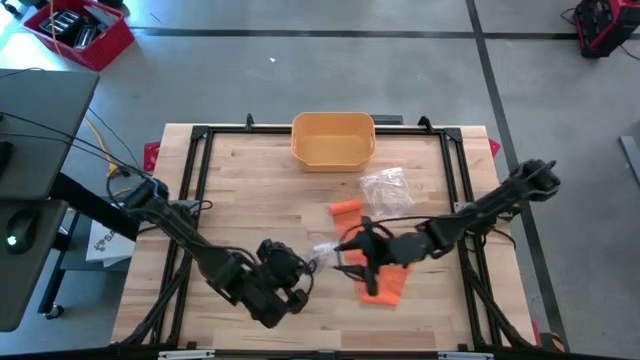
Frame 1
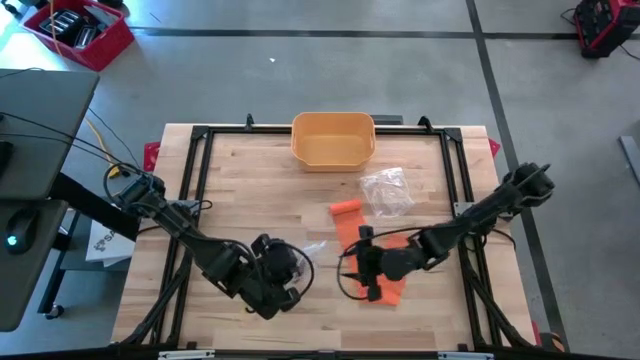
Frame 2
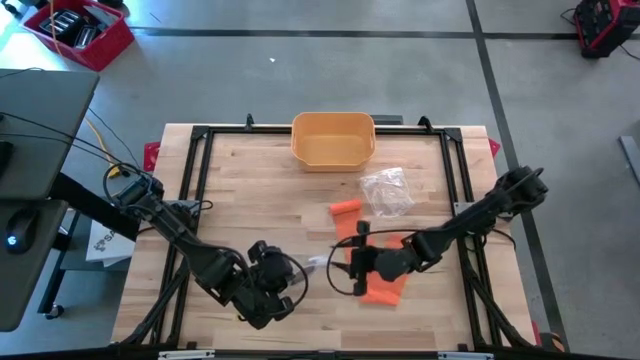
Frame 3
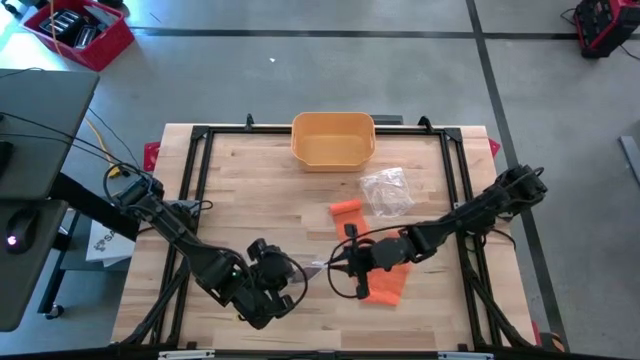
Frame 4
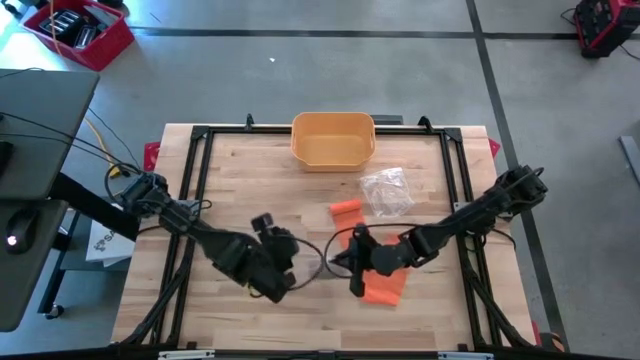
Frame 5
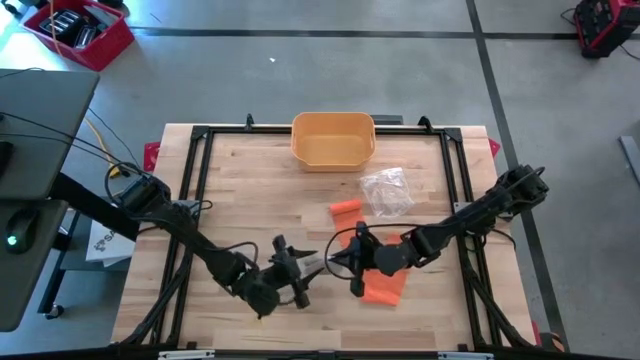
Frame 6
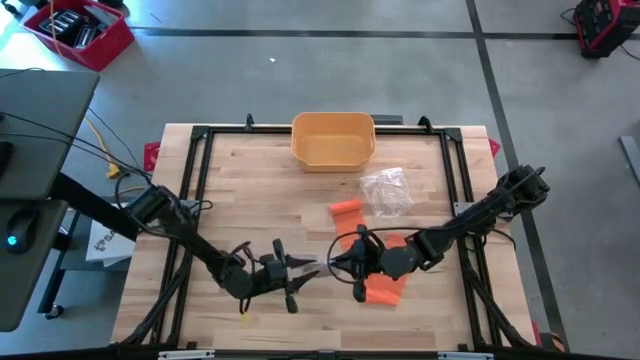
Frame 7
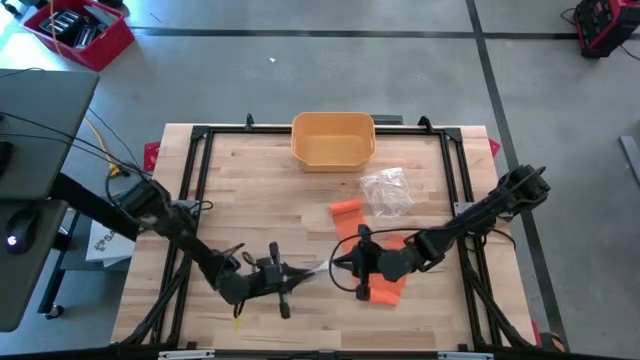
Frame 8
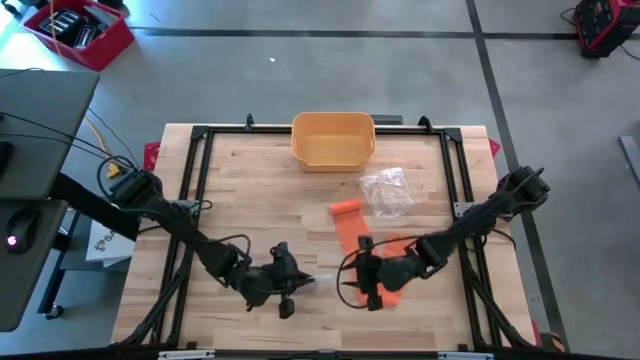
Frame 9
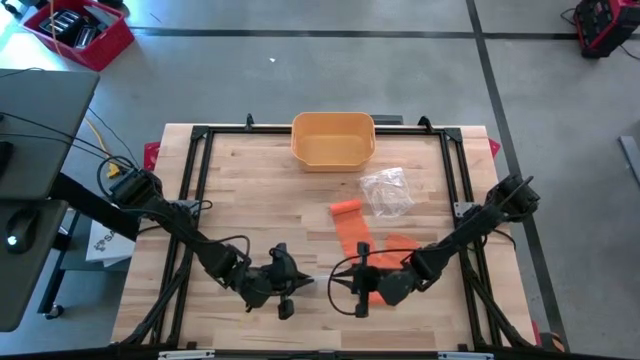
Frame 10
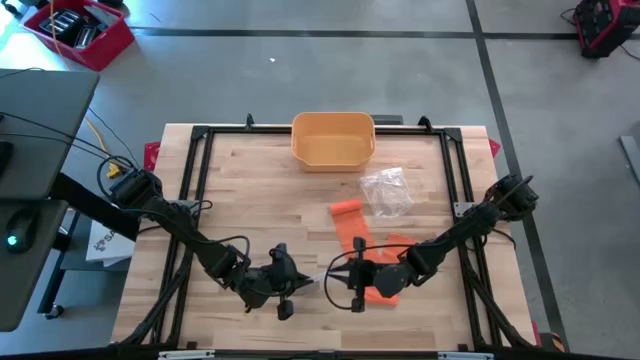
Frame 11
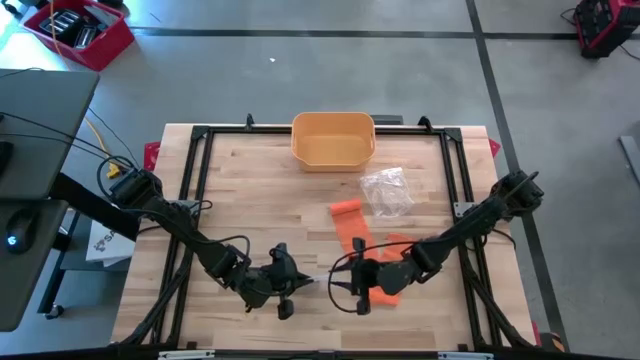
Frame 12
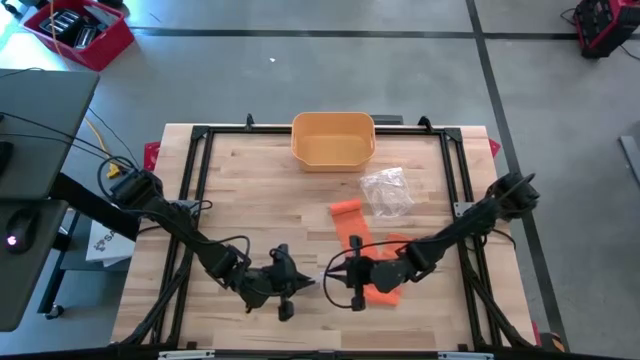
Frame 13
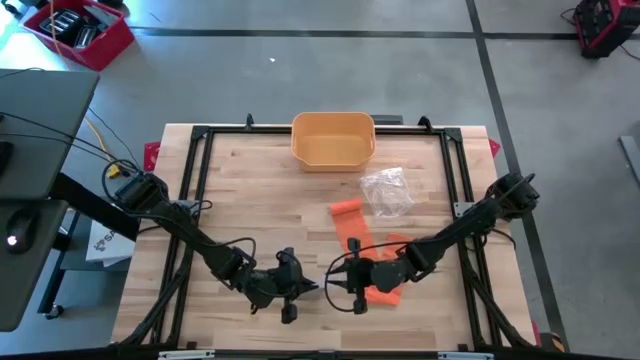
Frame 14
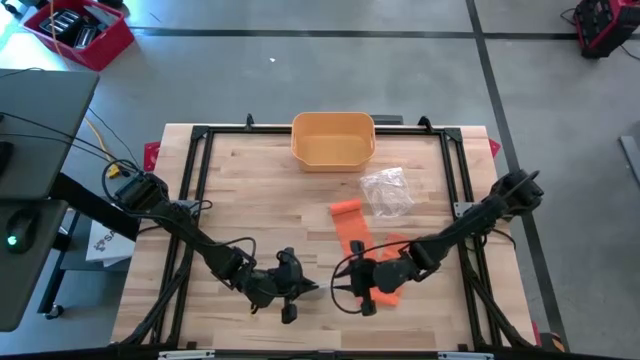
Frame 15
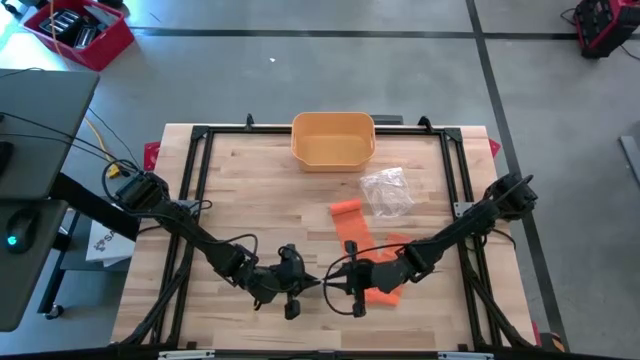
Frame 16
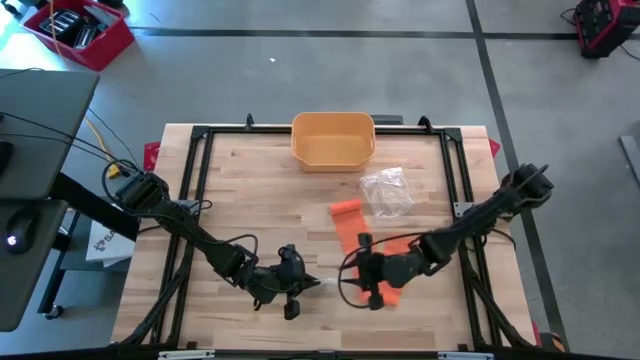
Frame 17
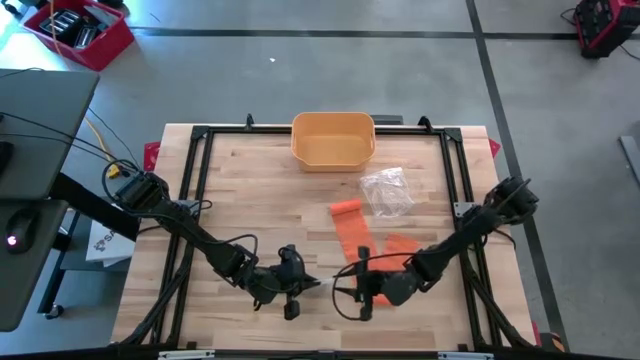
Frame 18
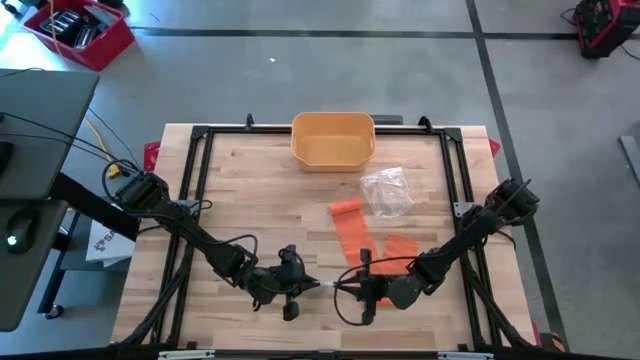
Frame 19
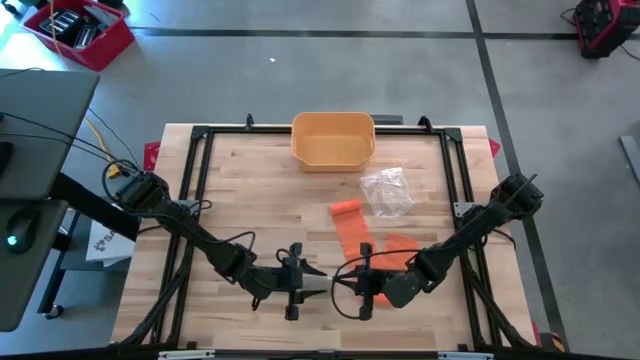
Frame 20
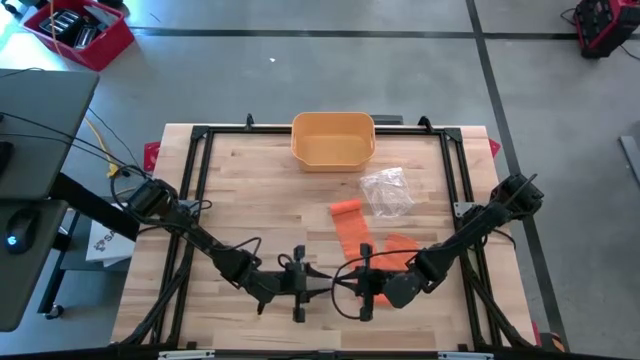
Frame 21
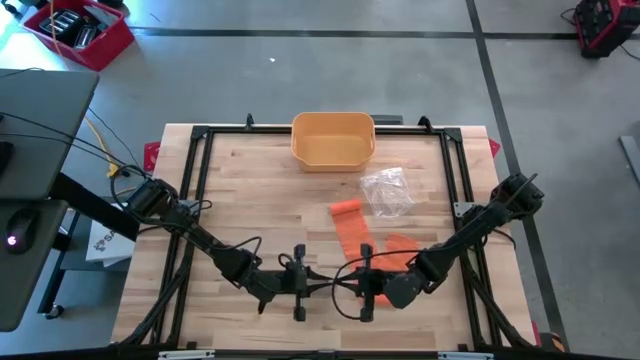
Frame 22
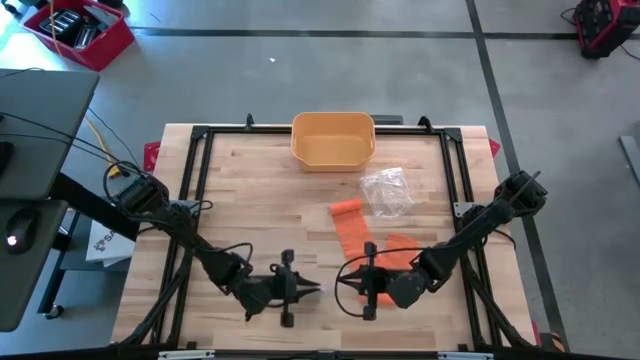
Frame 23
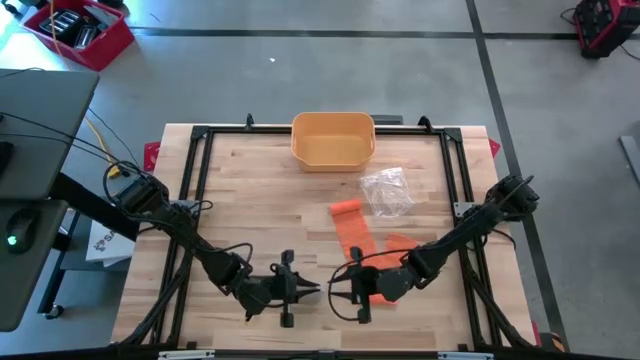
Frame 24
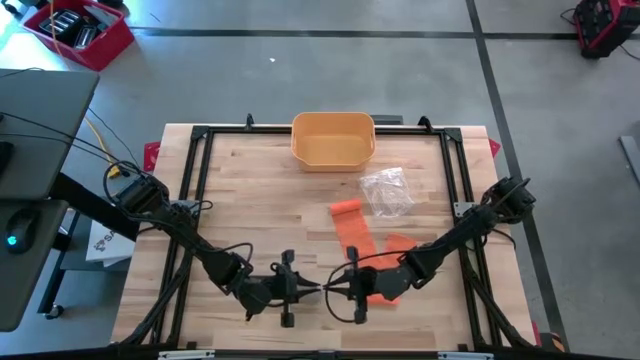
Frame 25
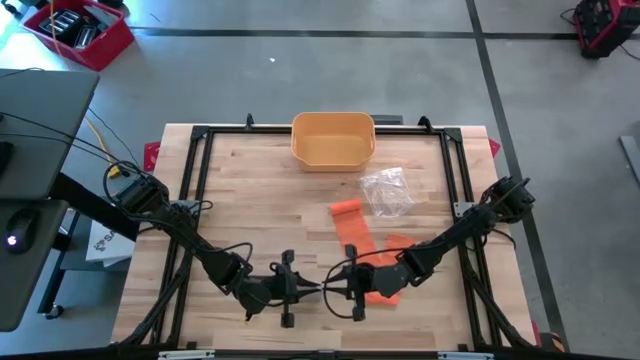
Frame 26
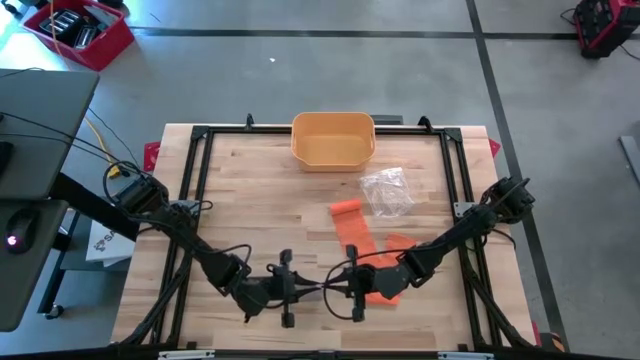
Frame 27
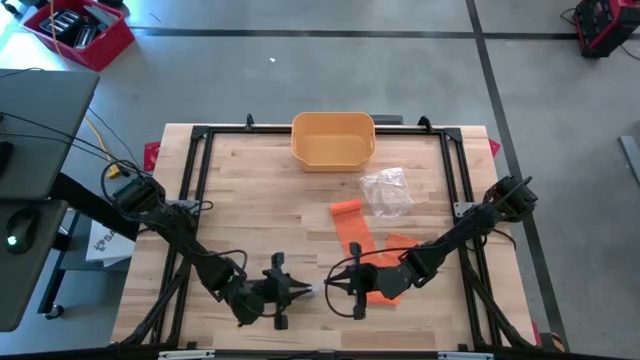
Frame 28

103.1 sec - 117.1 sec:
Task: Roll bandage
Close the bottom transparent zip

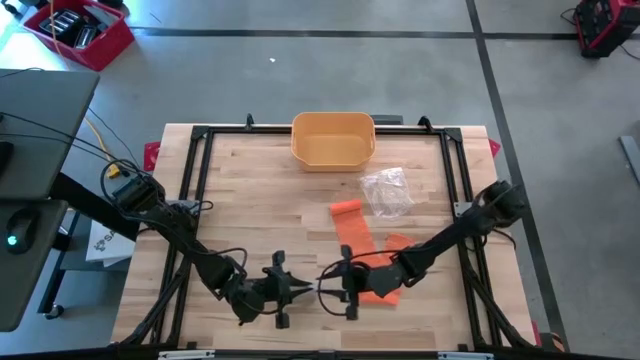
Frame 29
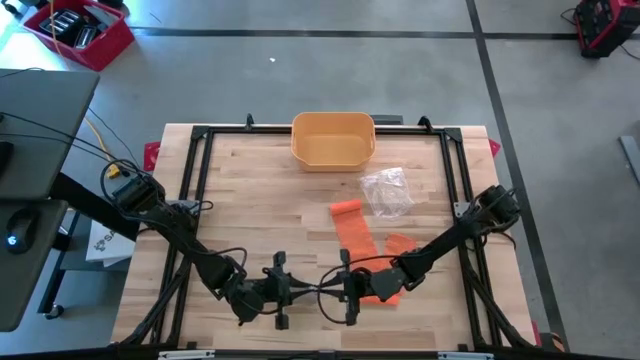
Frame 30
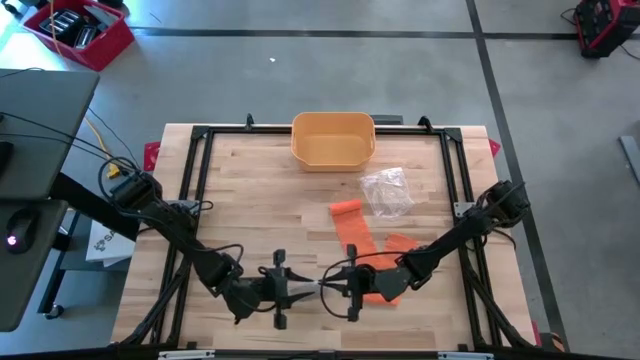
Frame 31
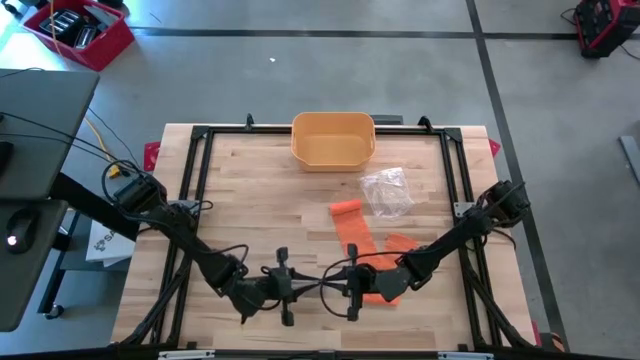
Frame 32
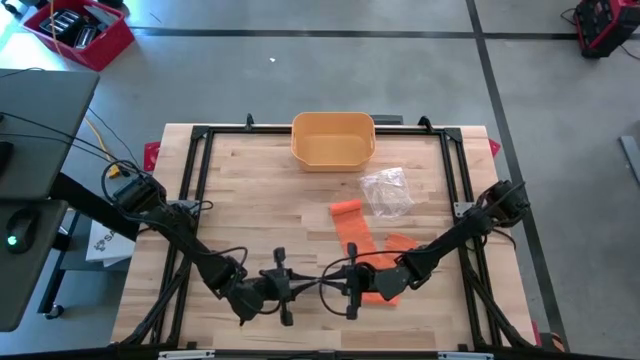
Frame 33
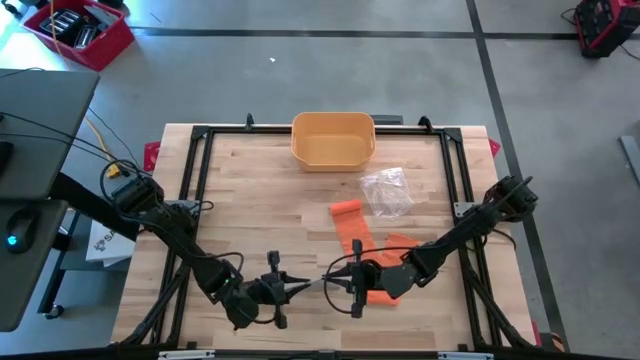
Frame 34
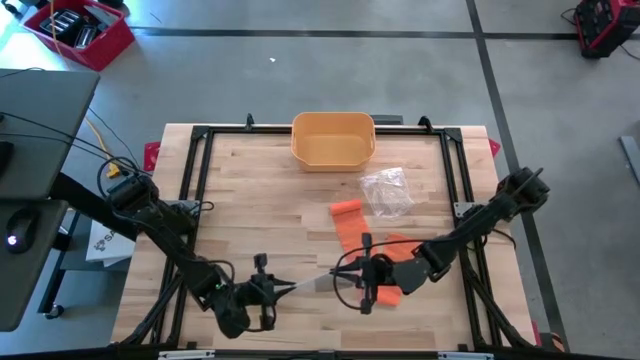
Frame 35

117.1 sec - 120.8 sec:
Close the bottom transparent zip

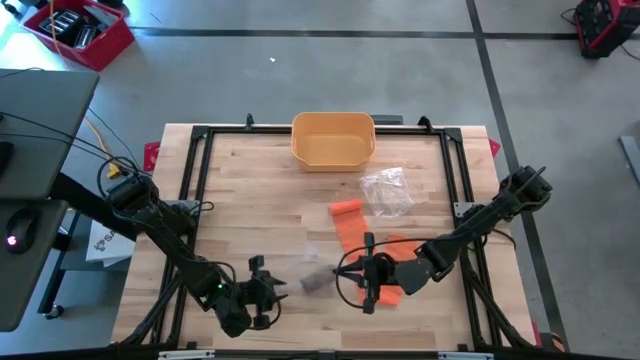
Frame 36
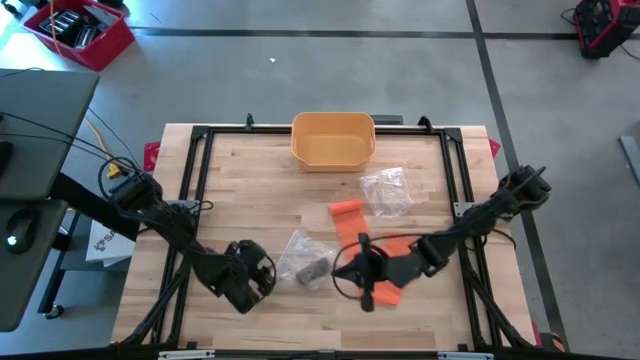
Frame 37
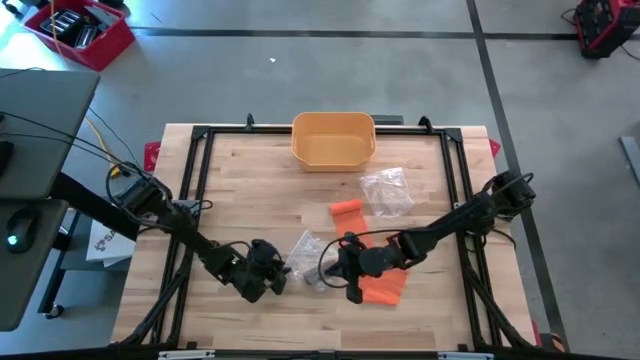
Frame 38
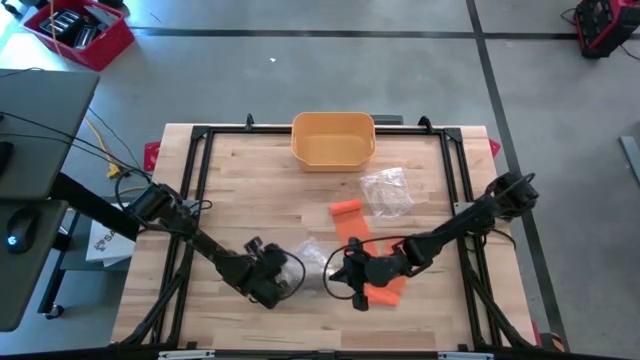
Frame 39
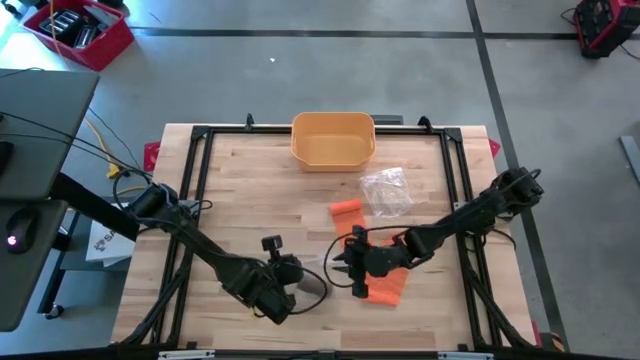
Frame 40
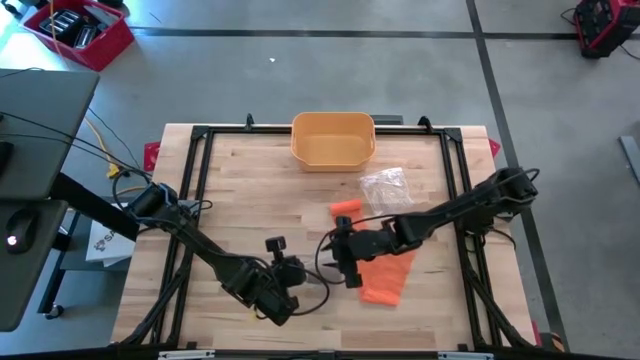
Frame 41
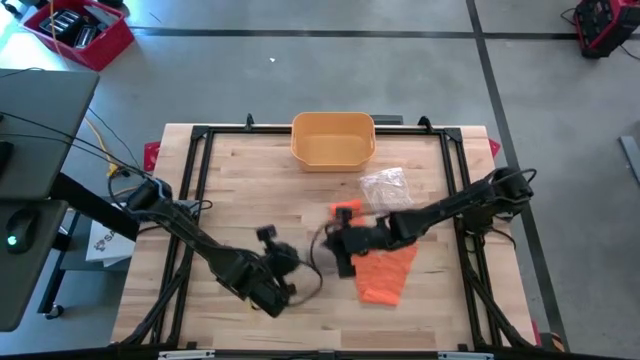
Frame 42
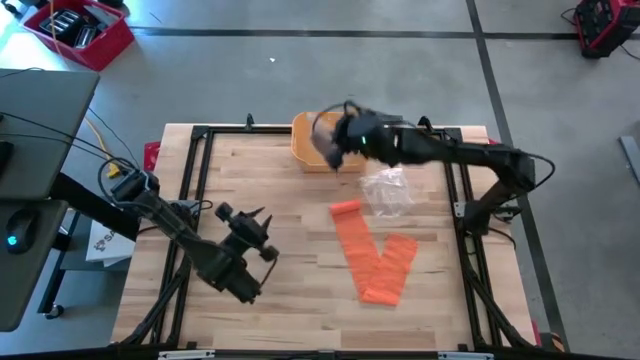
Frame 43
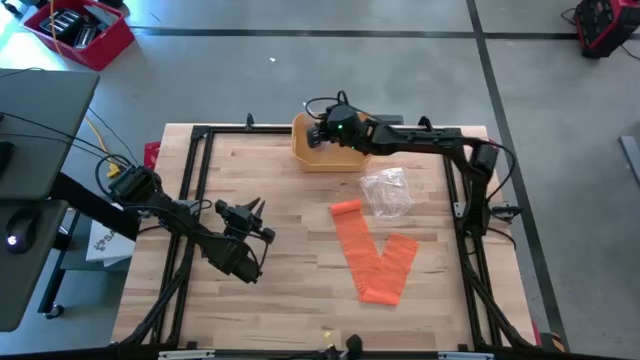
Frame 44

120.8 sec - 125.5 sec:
Put the bottom transparent zip bag with the rolled brown bandage into the yellow bin
